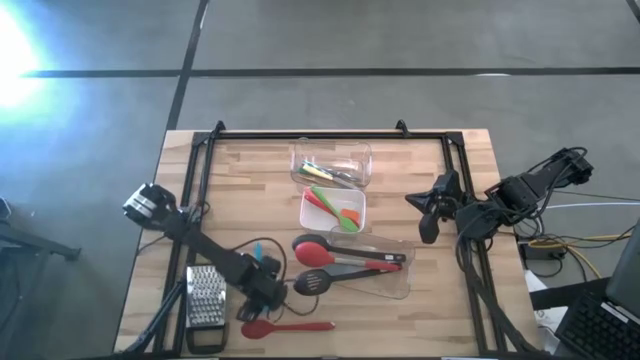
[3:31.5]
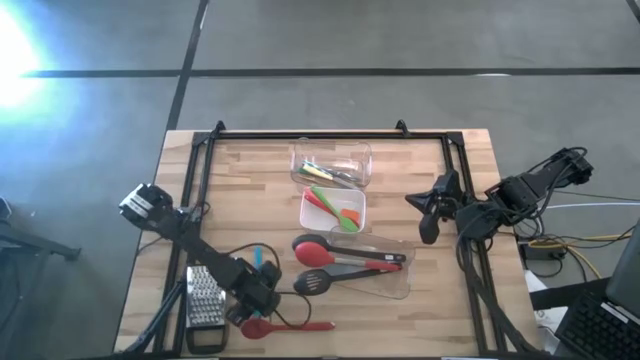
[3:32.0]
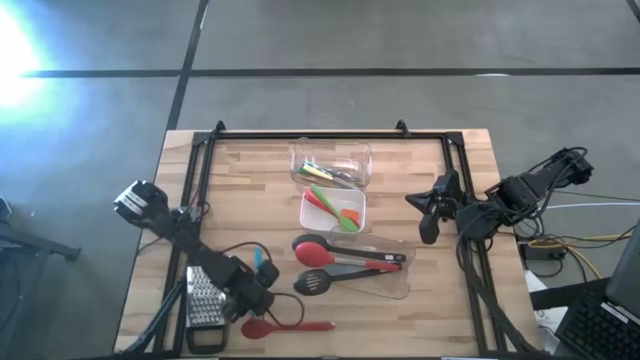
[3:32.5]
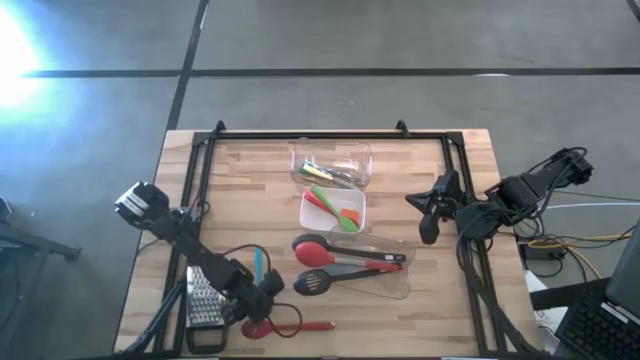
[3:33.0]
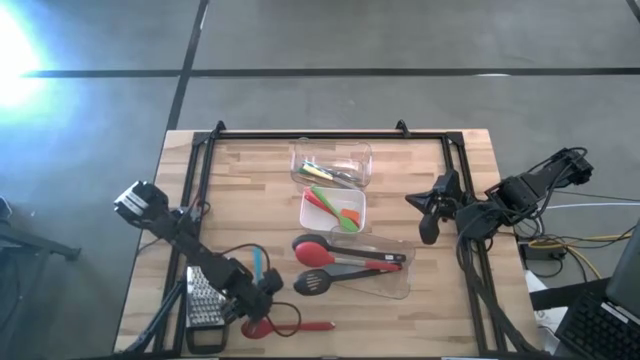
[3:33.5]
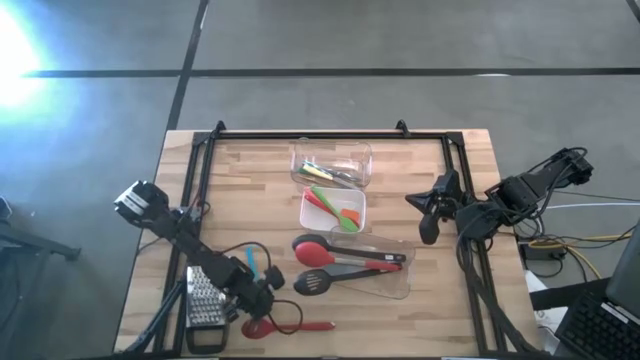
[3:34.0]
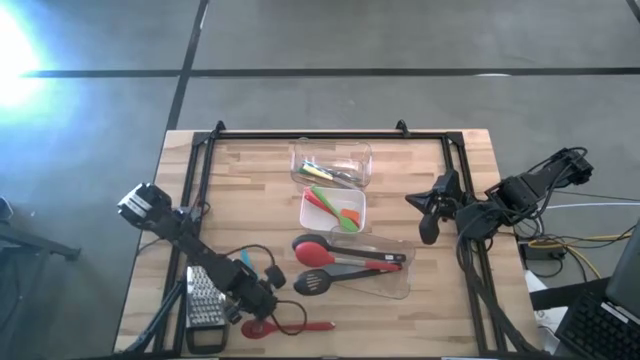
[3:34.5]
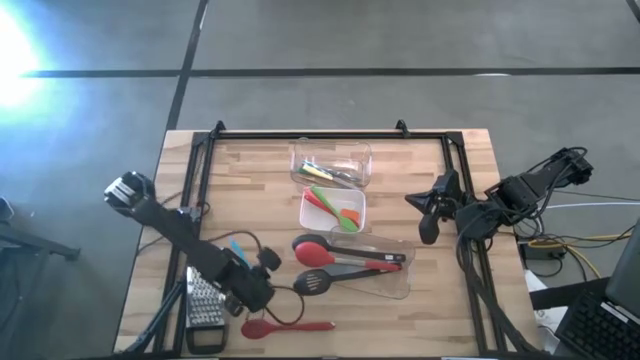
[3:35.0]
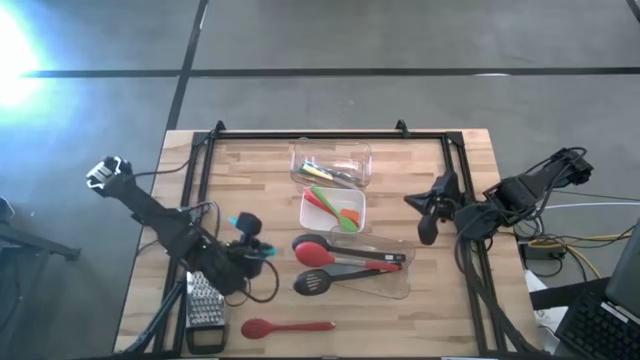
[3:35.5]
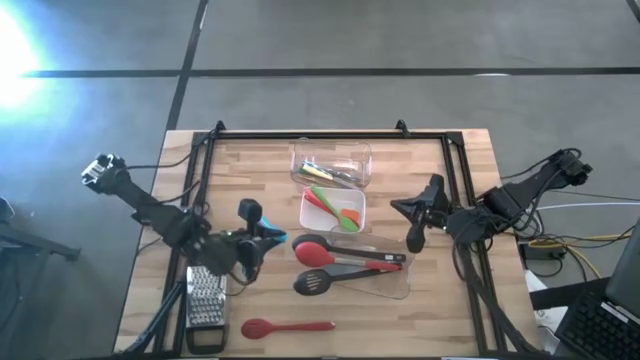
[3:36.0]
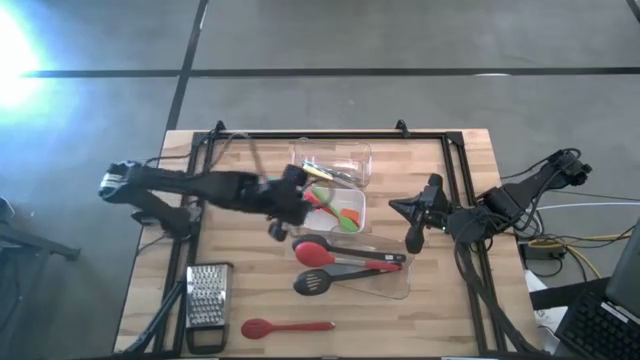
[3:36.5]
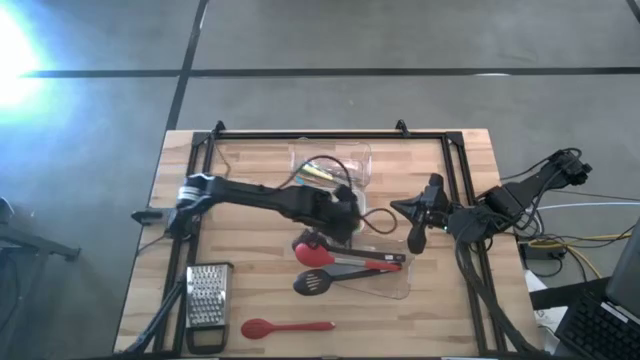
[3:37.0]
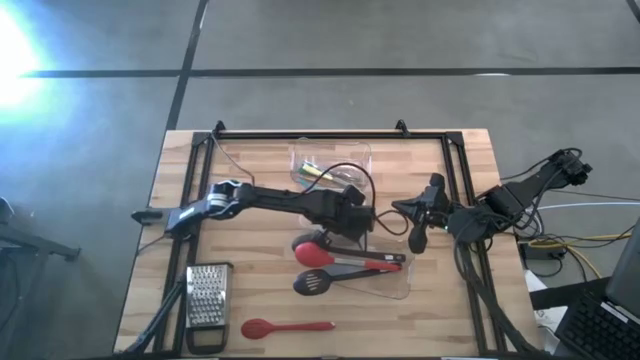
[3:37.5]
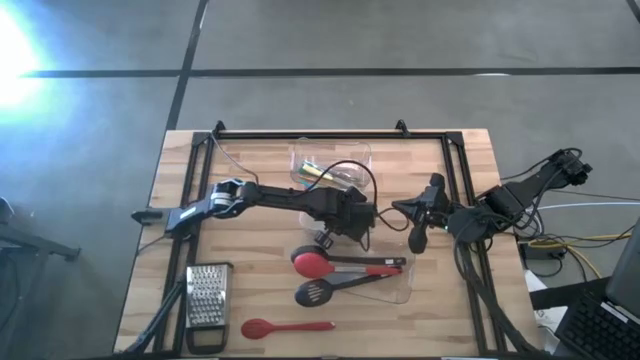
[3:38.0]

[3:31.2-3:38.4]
Task: Pick & Place Kitchen Items
Put the blue spatula into the white bin

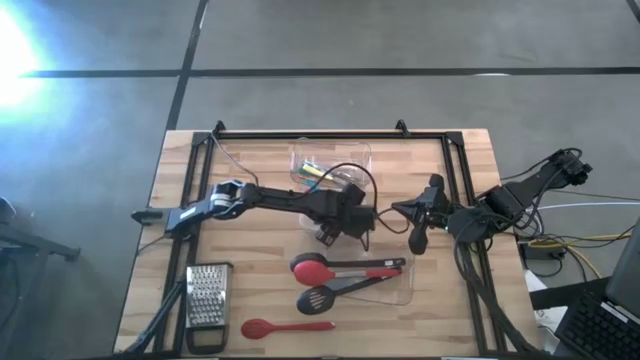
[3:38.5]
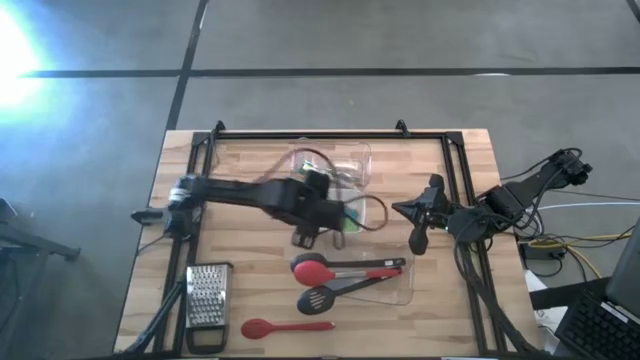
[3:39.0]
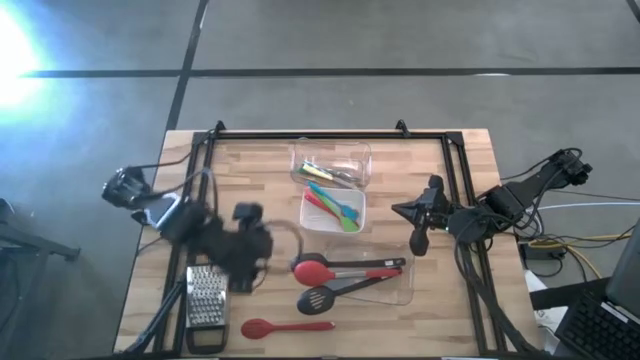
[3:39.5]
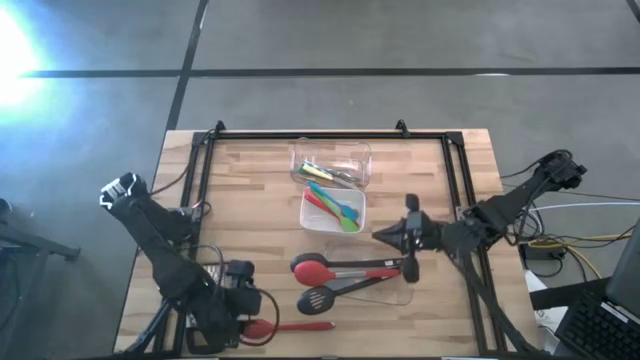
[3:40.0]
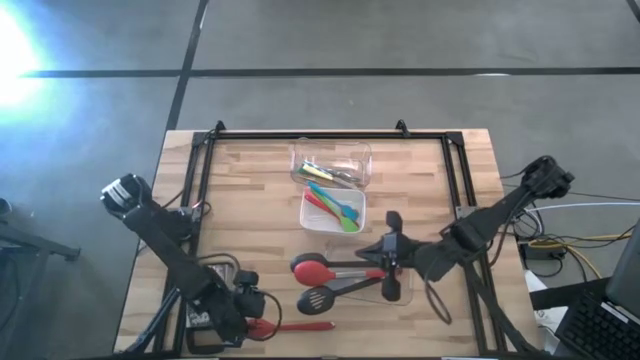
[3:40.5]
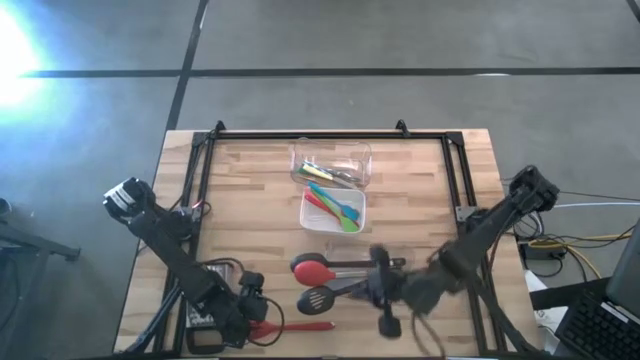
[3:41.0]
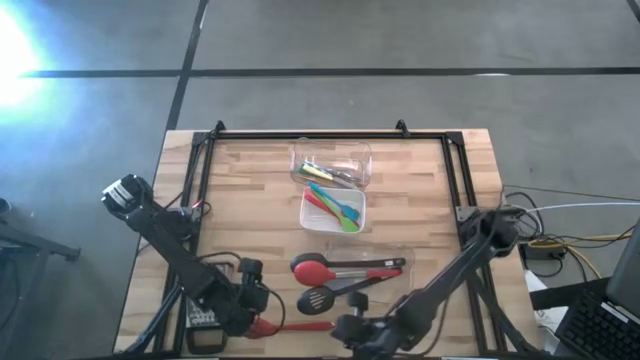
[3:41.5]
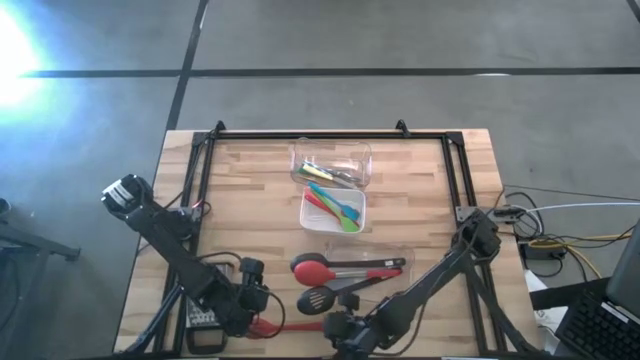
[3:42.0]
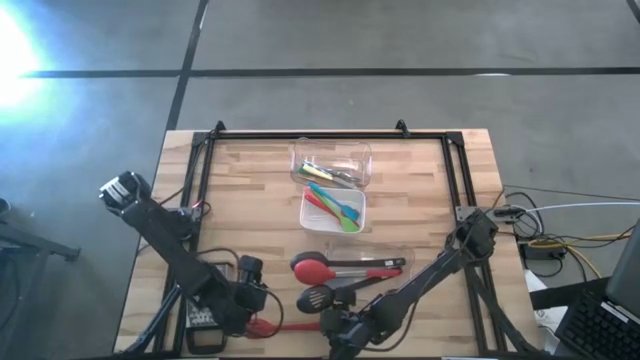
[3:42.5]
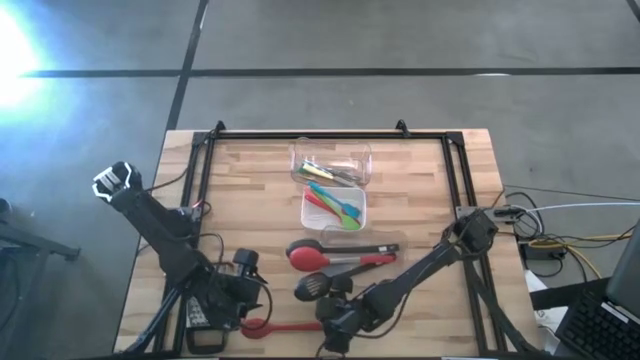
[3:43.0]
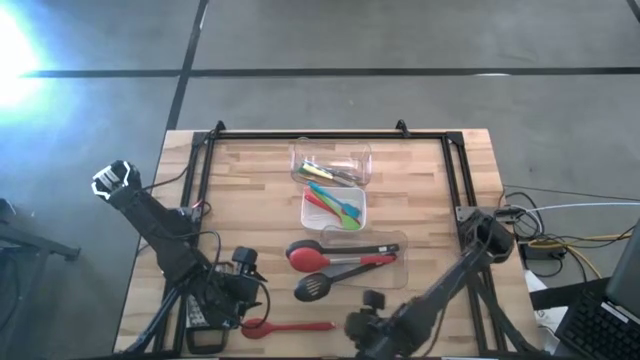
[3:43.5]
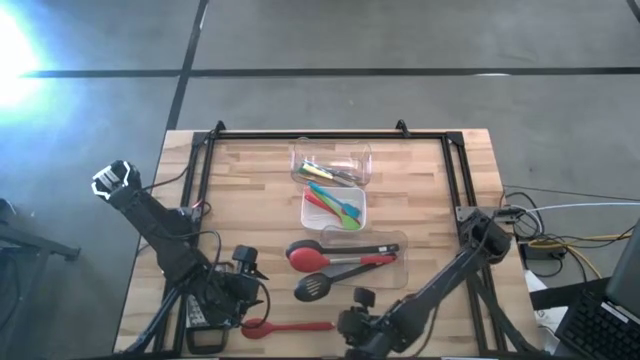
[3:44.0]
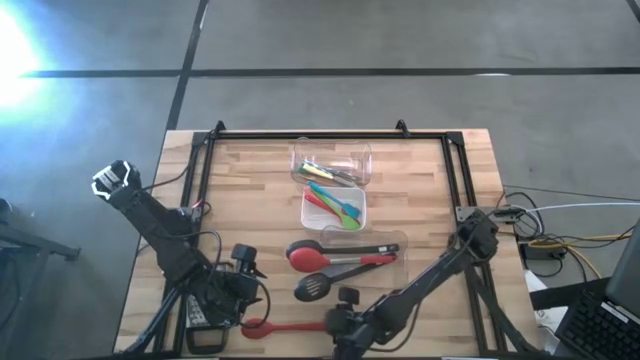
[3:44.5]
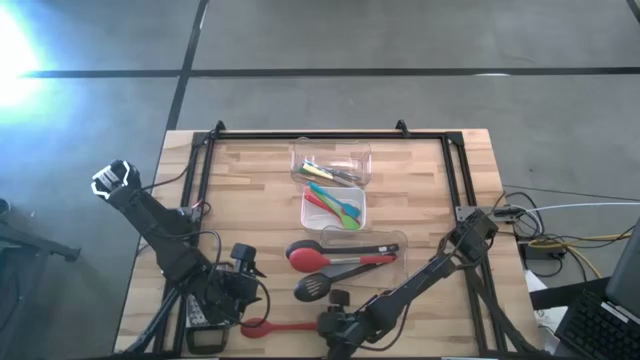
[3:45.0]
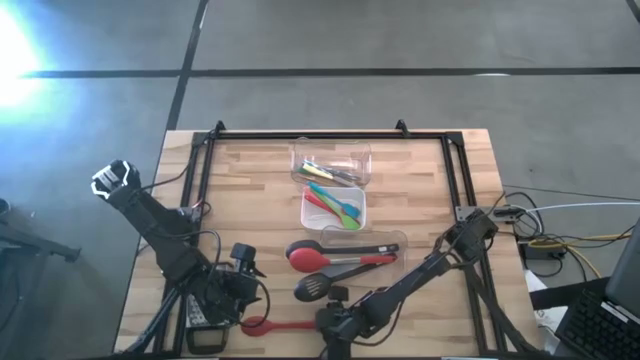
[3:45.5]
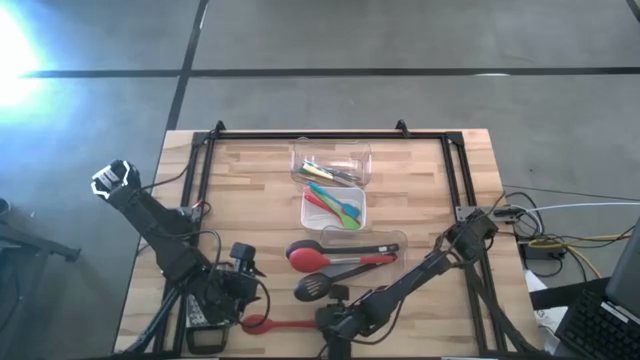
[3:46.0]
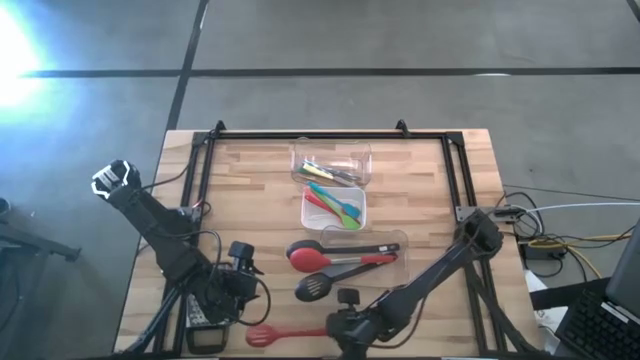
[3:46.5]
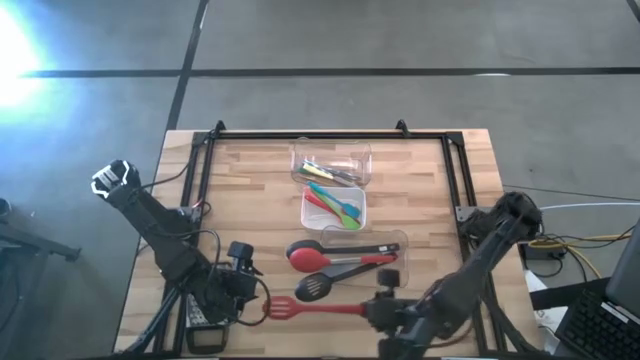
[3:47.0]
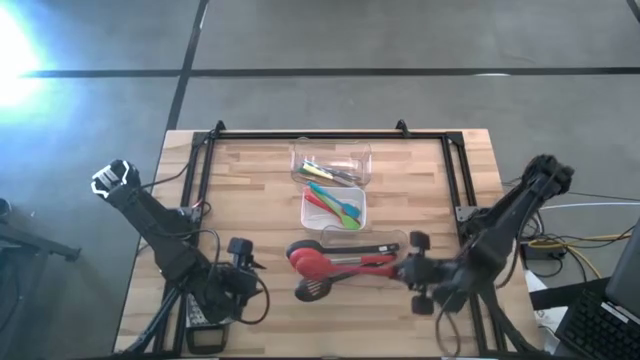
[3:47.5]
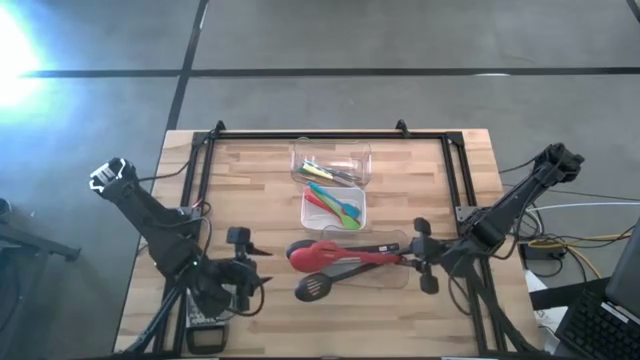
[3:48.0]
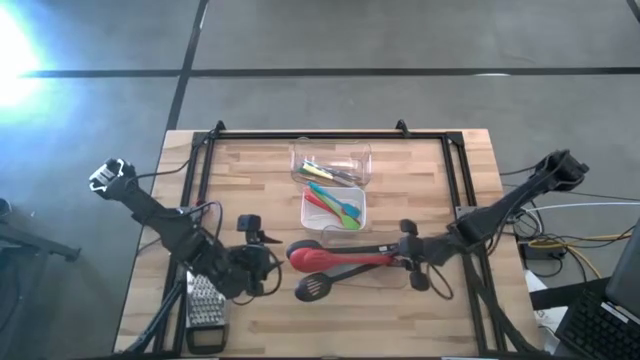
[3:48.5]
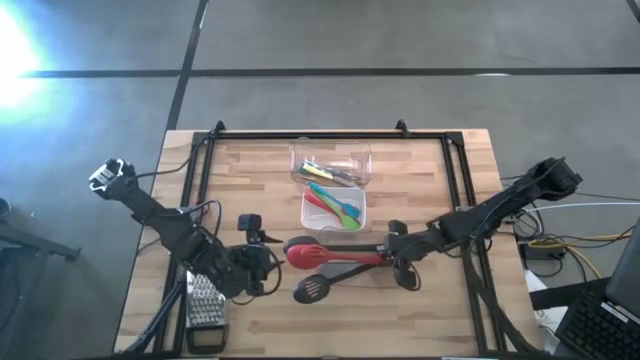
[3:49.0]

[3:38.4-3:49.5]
Put the red slotted spoon into the bottom transparent bin

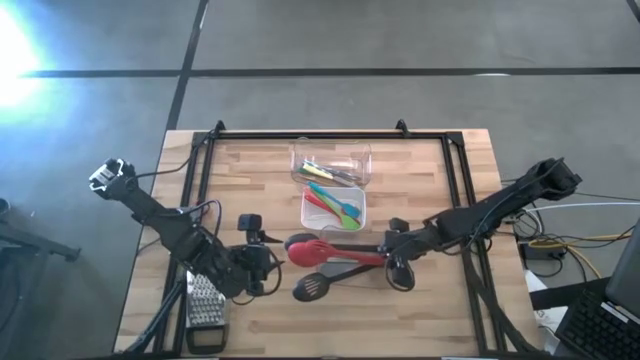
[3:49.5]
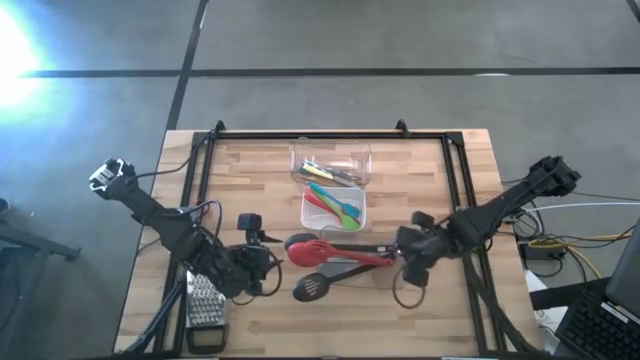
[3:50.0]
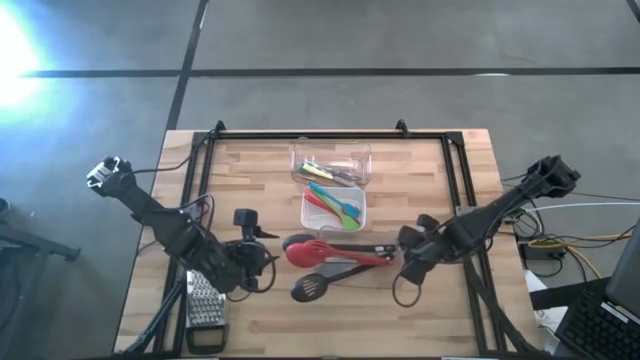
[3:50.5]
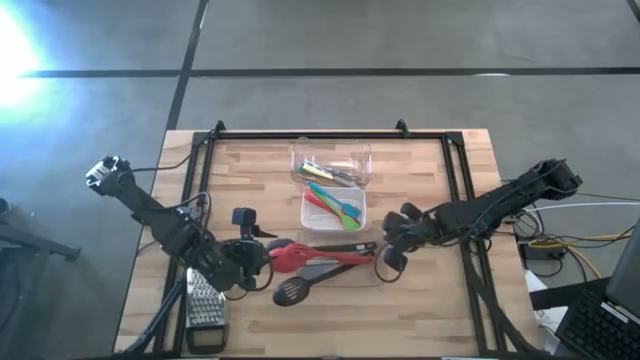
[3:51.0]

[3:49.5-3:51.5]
Adjust the bottom transparent bin

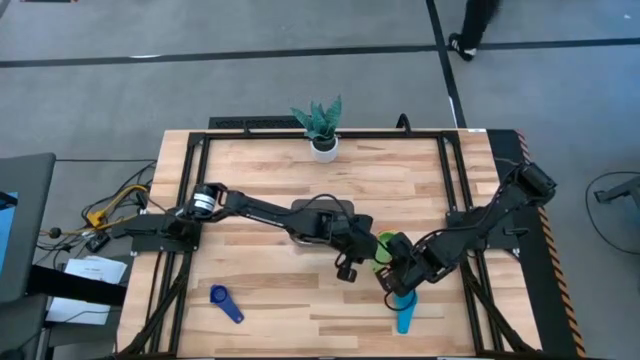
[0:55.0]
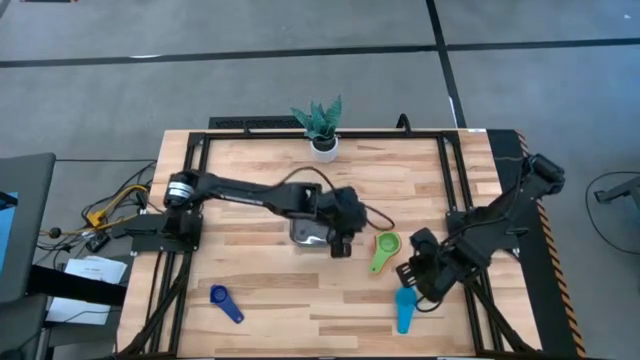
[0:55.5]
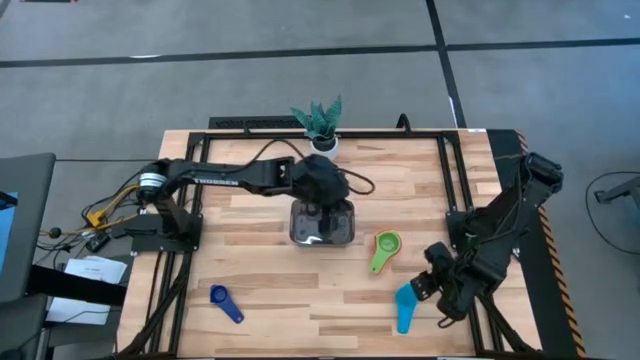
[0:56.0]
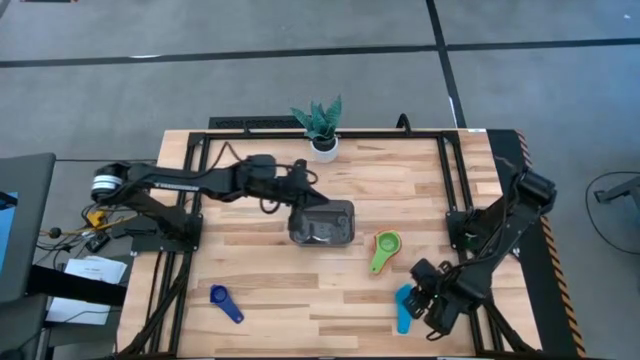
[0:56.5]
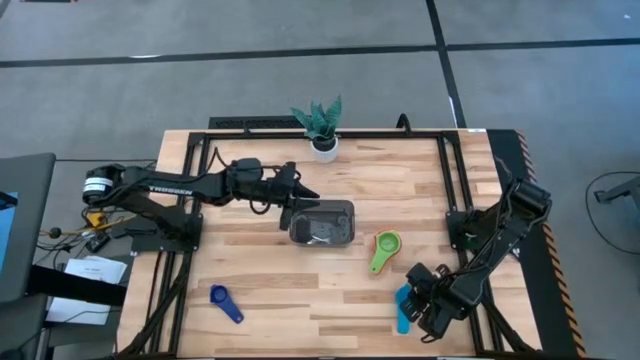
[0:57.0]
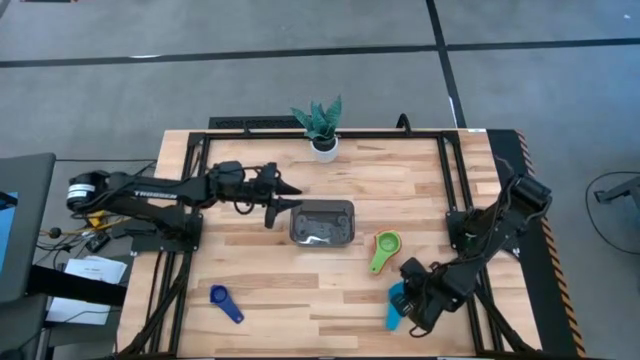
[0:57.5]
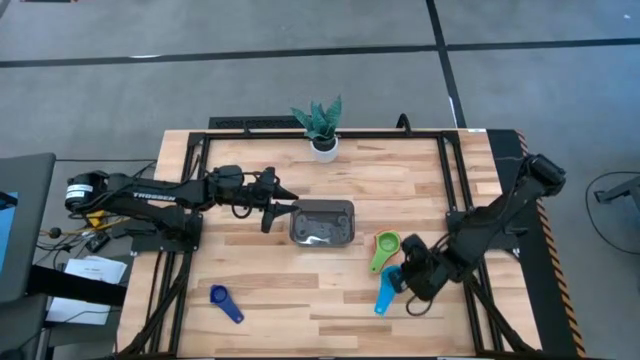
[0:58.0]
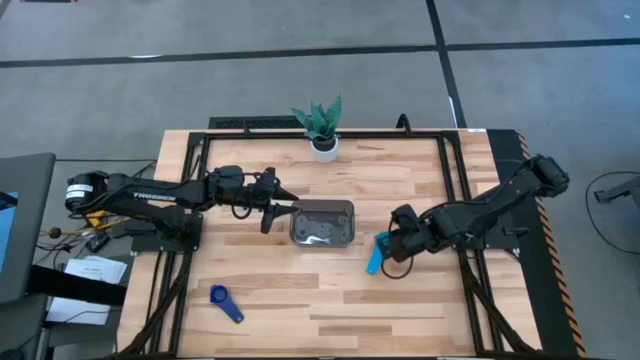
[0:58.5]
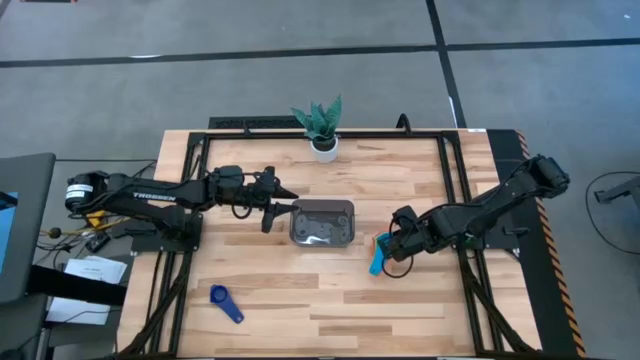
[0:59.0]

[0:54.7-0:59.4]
Task: Nest measuring cups in basket
Stack the light blue measuring cup on top of the green measuring cup
